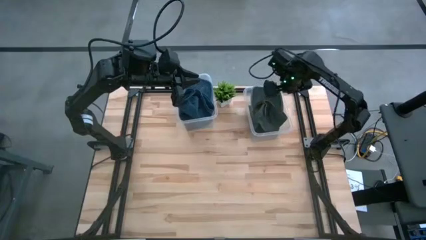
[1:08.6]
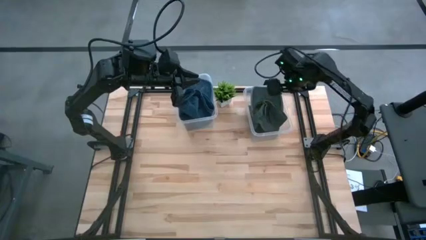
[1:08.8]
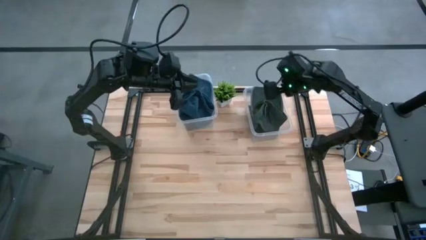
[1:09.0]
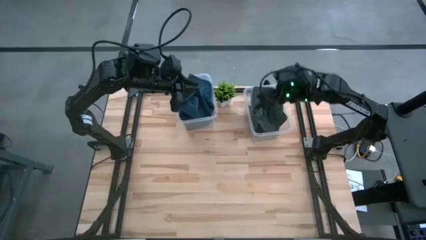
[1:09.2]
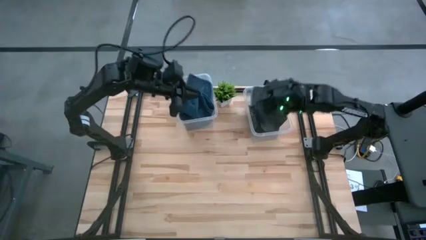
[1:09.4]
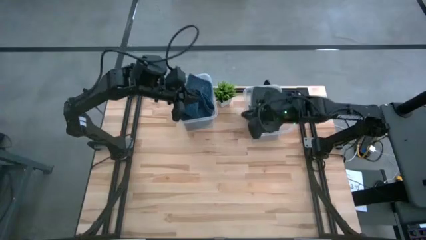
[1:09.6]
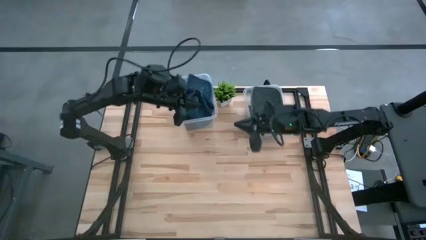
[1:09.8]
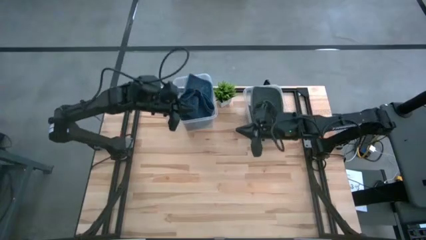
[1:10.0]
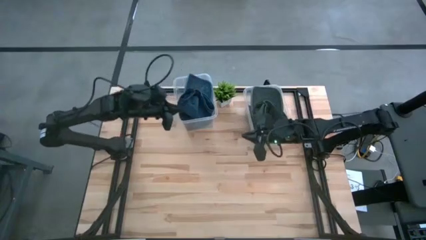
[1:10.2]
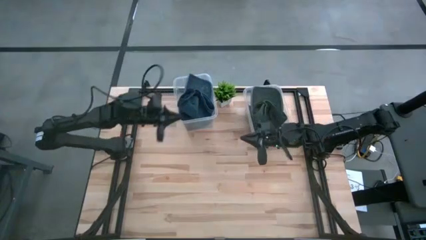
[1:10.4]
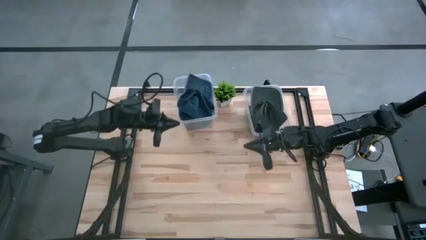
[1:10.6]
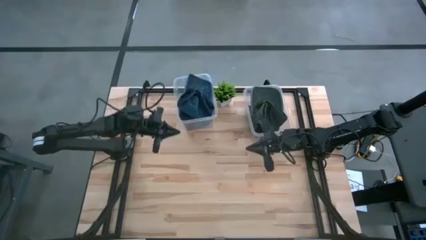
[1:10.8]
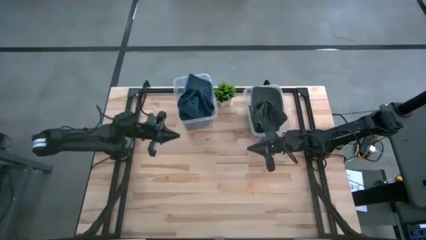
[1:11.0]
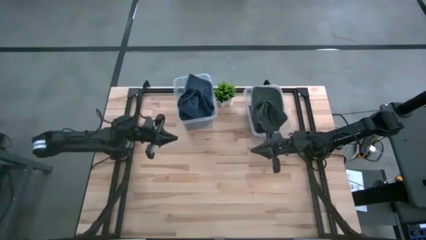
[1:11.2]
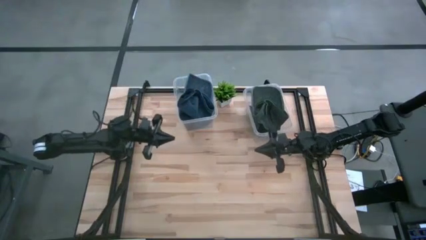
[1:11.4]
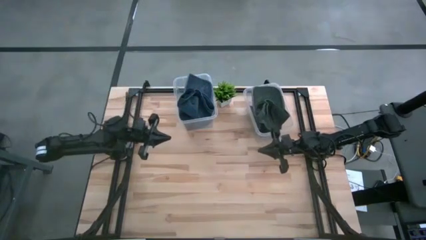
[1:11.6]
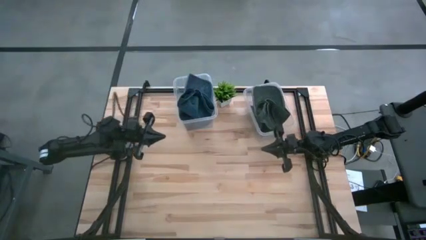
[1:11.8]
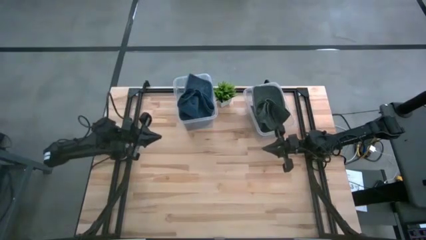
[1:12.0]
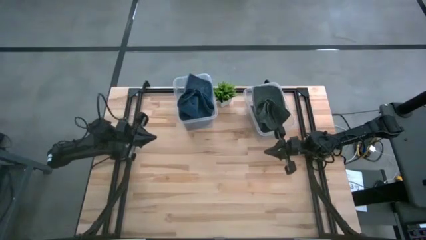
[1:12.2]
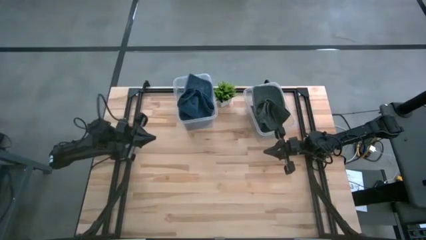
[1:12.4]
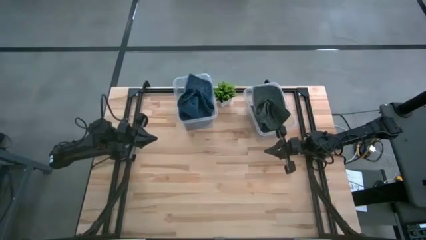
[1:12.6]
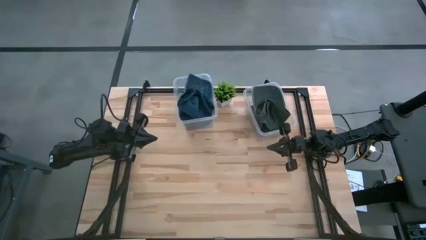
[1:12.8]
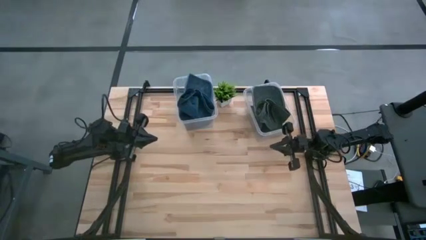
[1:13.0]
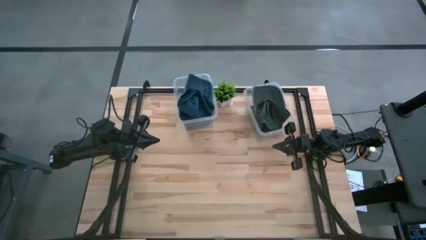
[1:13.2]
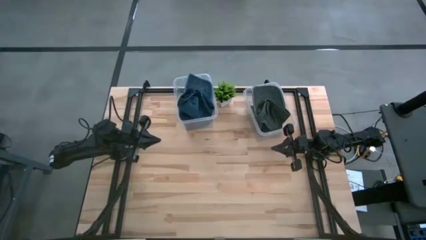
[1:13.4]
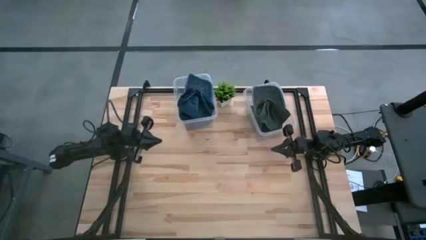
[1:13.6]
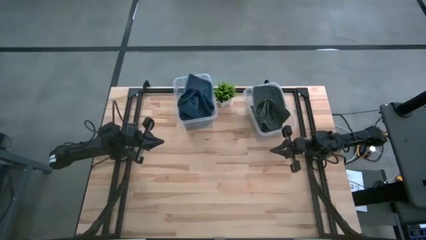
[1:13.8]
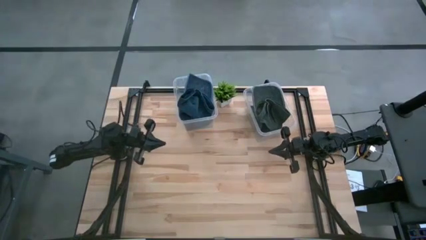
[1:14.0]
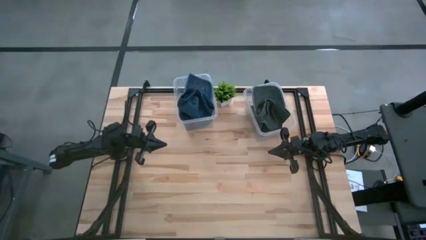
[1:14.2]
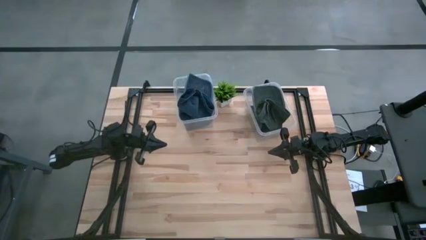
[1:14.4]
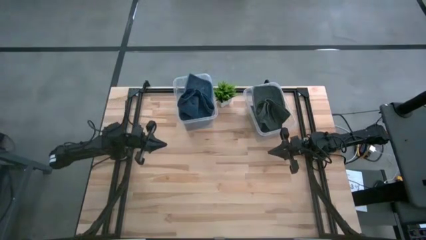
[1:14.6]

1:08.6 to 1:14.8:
Task: Pick & Place hat
Return to Home Position

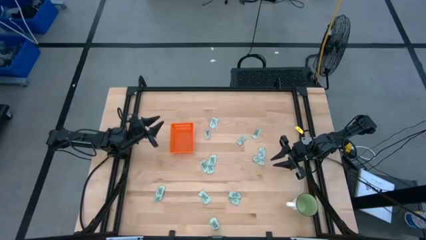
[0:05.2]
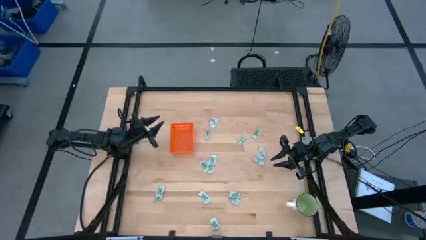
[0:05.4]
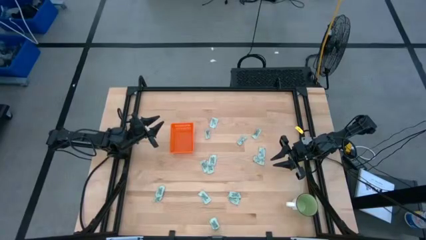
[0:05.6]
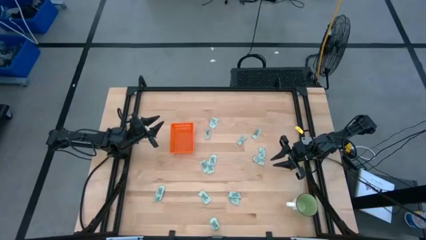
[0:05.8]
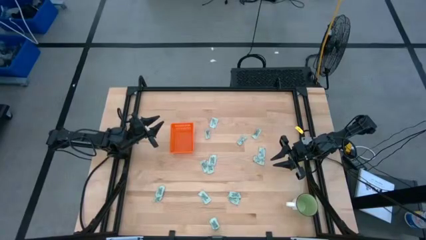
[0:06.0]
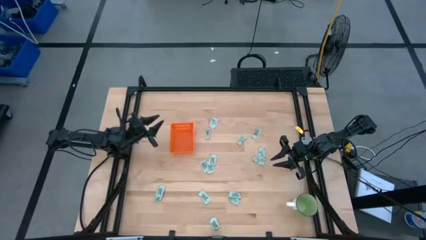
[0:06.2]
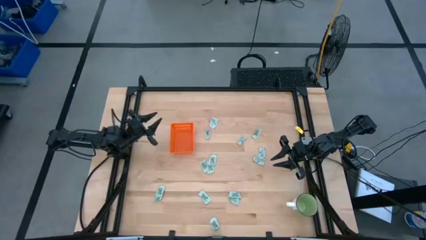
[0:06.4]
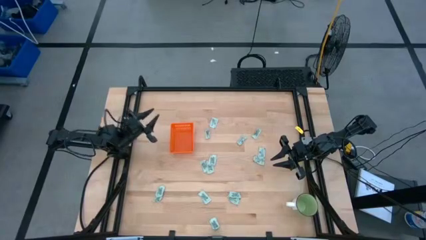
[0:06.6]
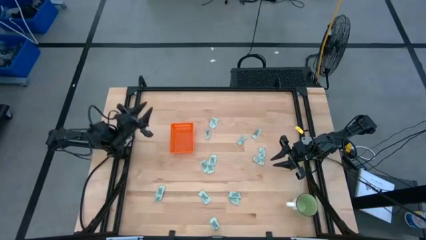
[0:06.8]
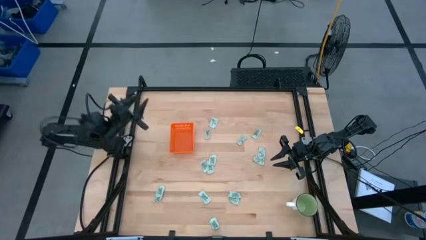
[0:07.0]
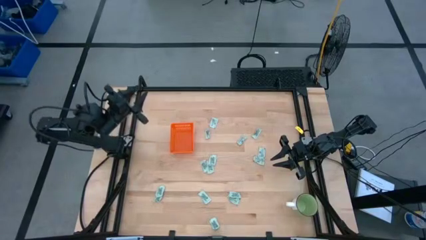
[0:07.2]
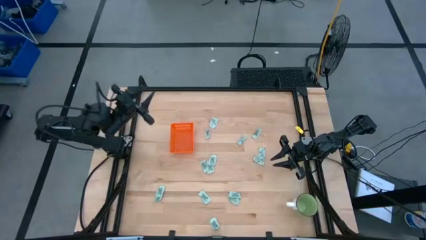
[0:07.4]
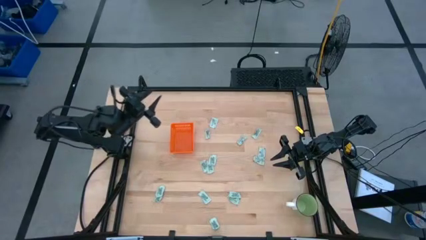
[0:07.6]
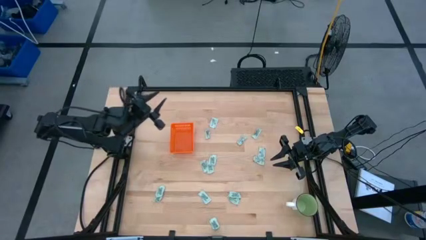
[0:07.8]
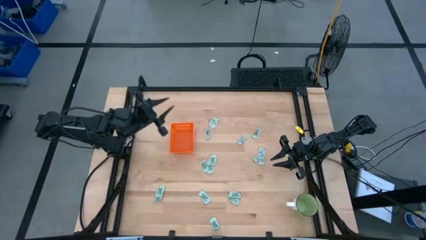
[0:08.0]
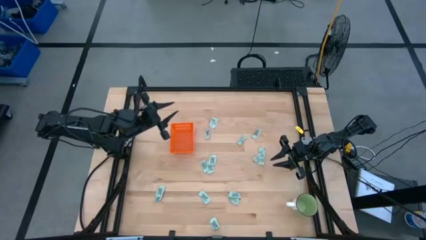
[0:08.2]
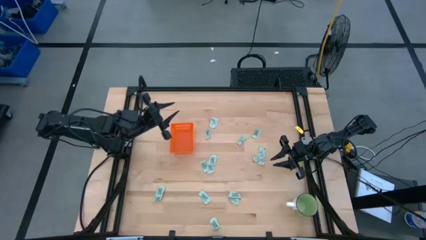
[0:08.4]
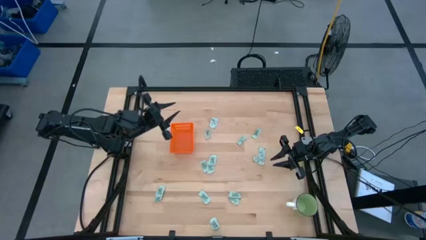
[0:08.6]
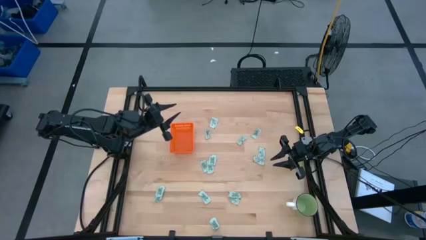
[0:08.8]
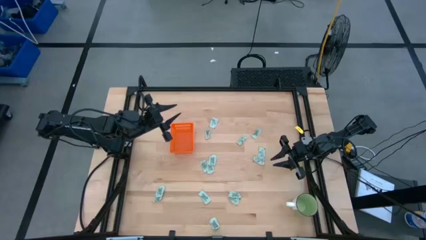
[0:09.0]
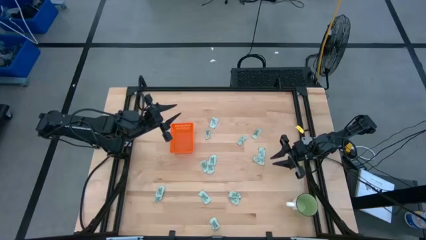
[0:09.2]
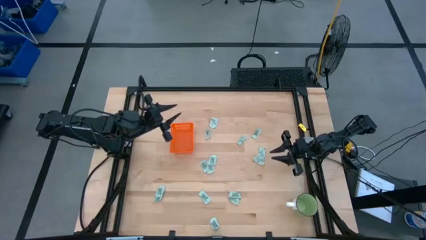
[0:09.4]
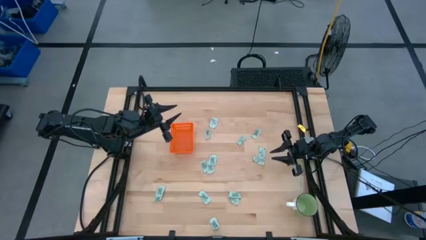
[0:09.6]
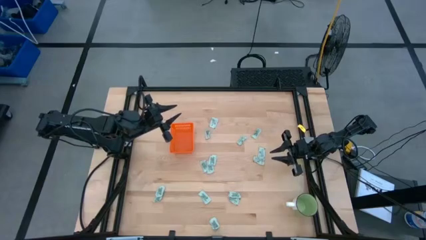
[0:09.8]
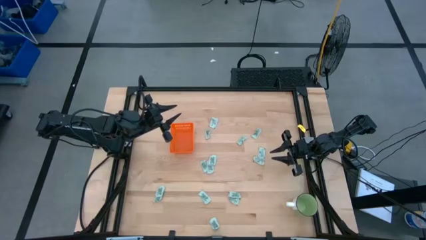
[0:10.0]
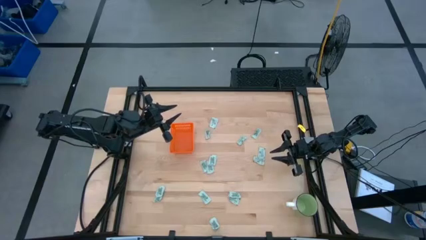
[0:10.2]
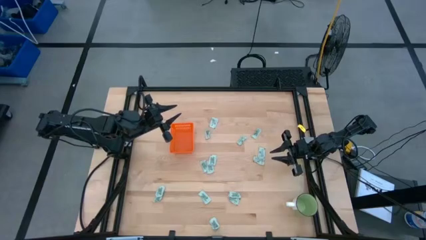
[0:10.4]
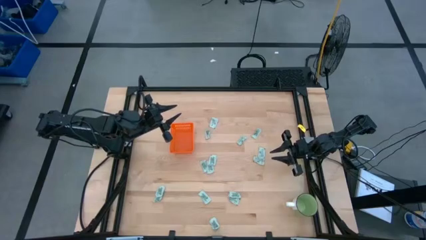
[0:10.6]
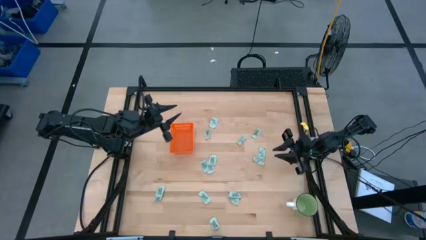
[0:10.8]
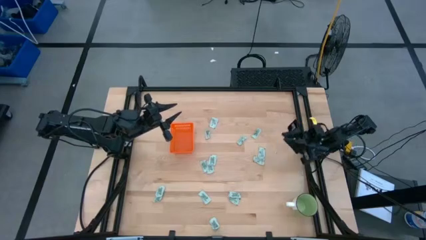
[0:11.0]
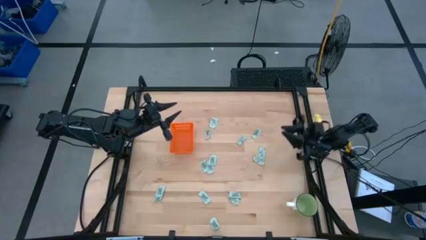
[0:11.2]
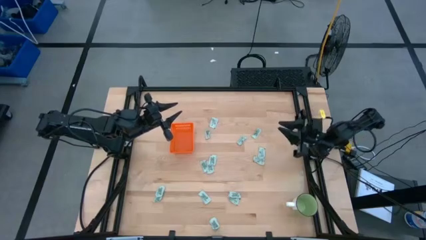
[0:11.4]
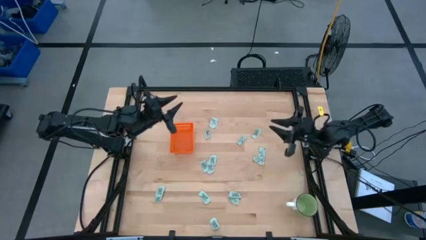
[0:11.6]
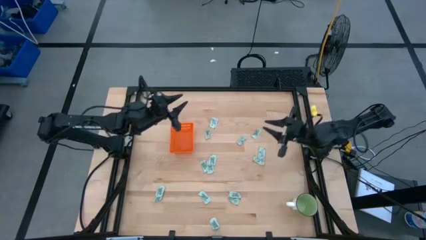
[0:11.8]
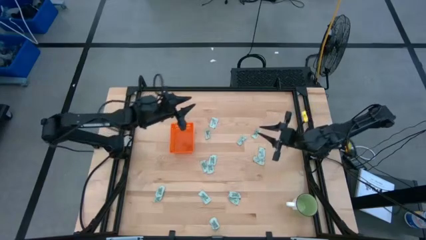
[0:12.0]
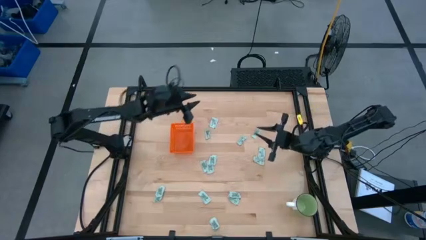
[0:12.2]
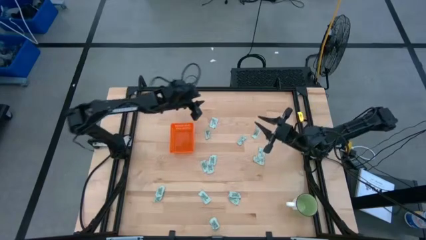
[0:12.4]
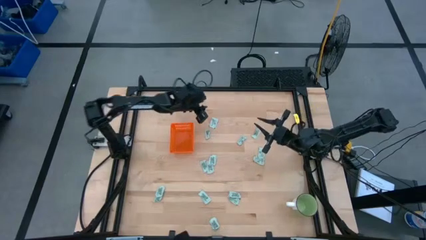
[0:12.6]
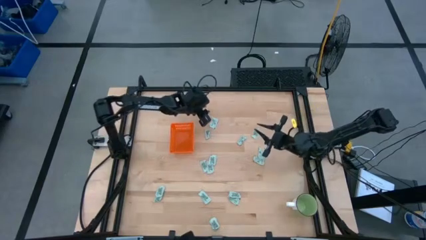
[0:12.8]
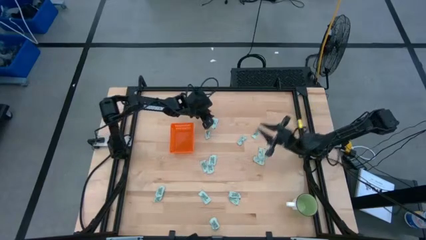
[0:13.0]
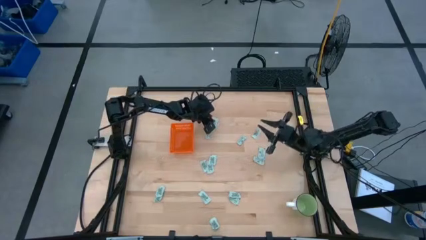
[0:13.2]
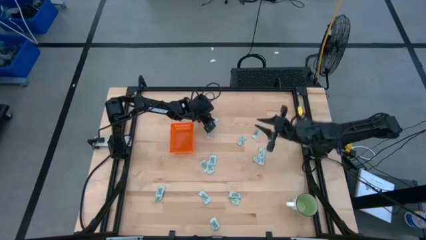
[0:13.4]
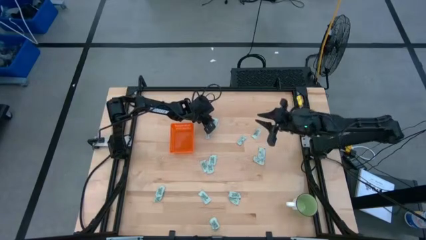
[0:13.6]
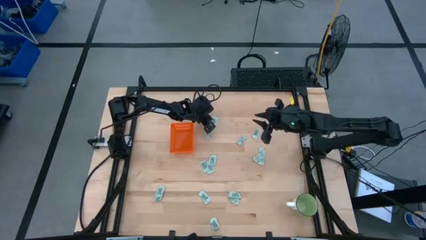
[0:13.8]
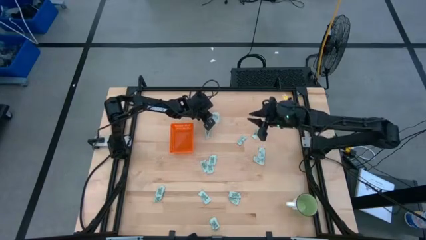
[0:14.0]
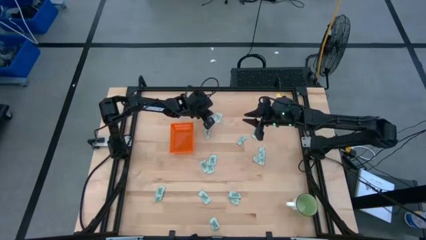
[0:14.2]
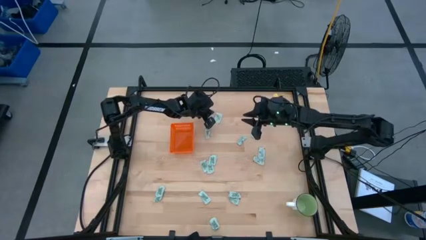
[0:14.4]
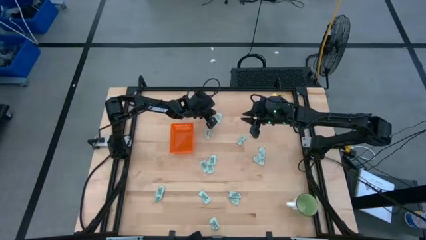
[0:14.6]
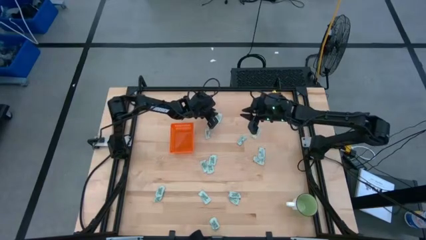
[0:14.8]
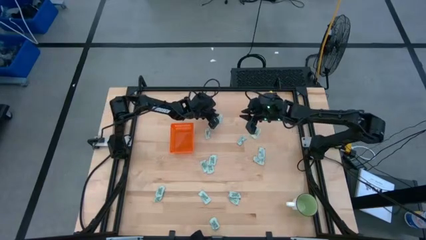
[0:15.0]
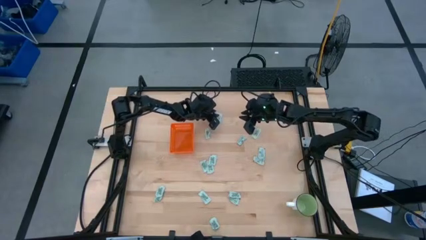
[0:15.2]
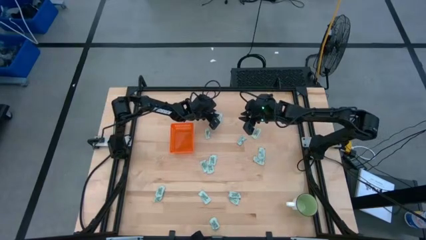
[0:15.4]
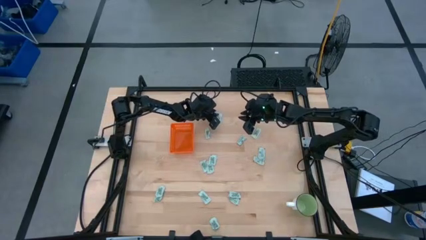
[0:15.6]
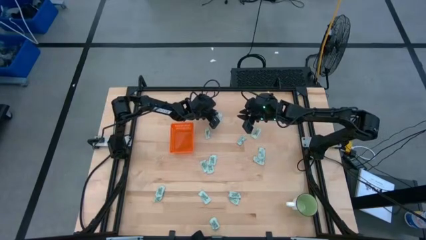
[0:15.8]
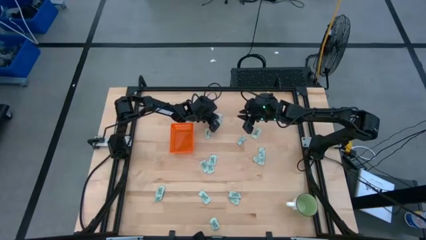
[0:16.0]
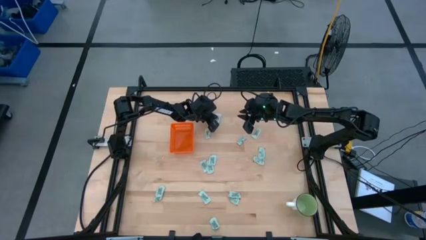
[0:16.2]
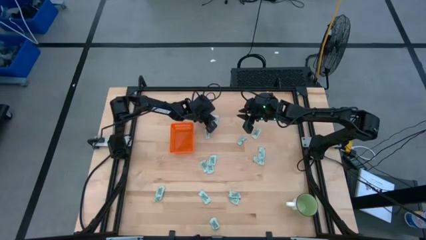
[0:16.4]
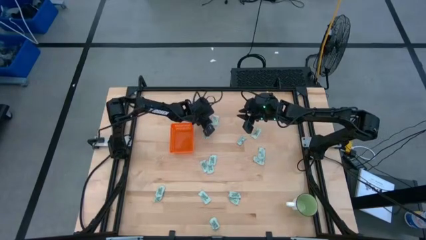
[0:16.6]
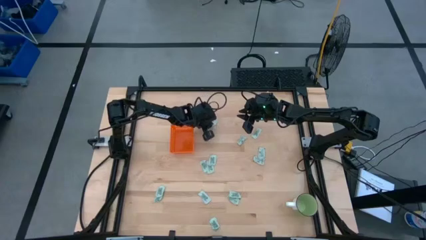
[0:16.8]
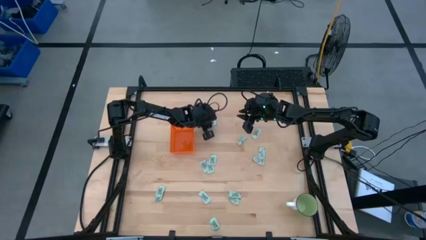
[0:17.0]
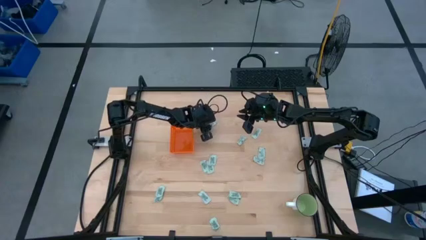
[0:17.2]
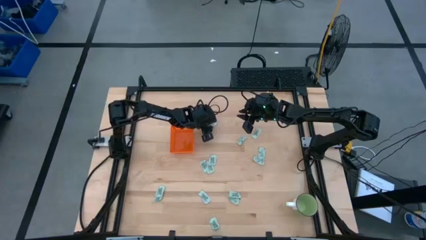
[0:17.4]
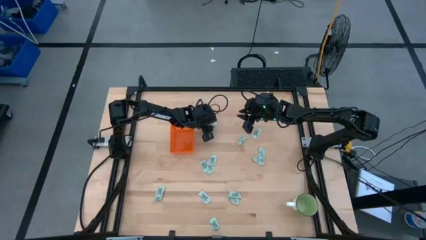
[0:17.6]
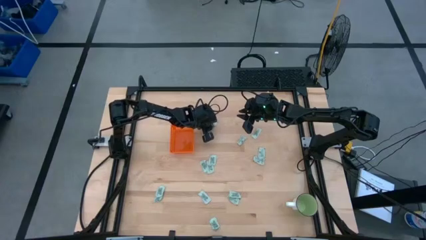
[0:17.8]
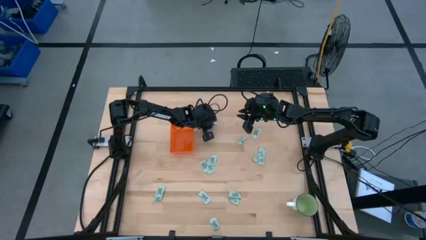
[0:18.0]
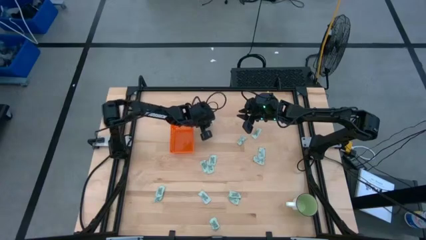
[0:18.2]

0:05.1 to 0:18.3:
Task: Pick and place Stevia / Truvia into bins
Put the green stevia packet into the orange bin
